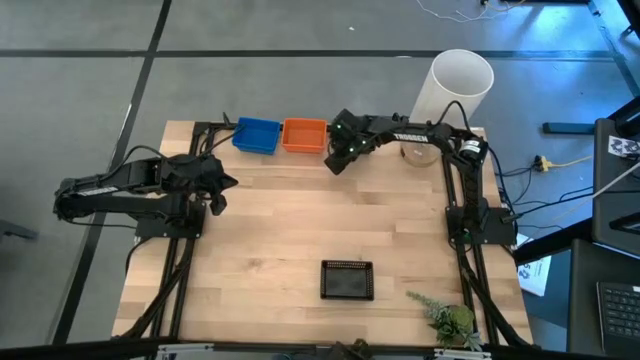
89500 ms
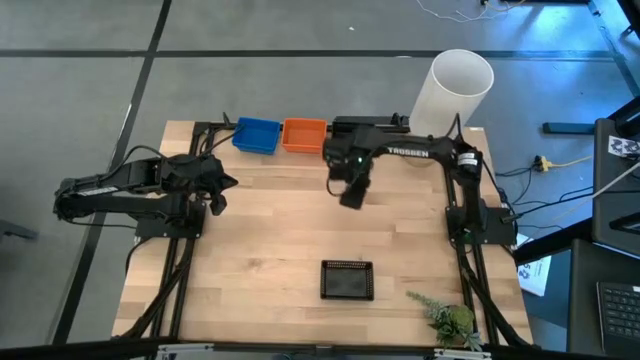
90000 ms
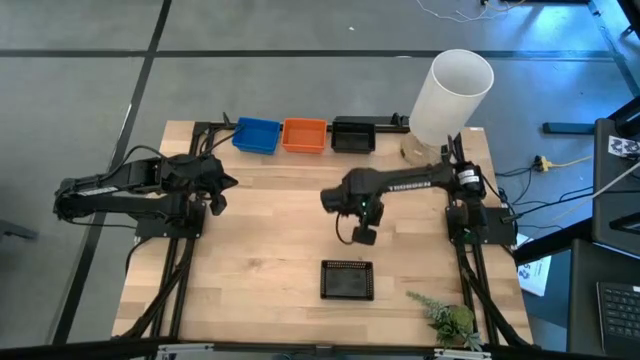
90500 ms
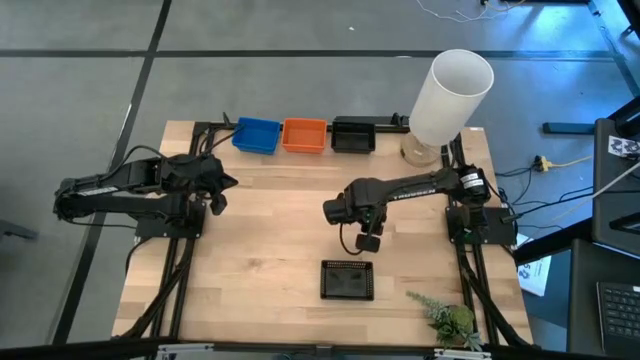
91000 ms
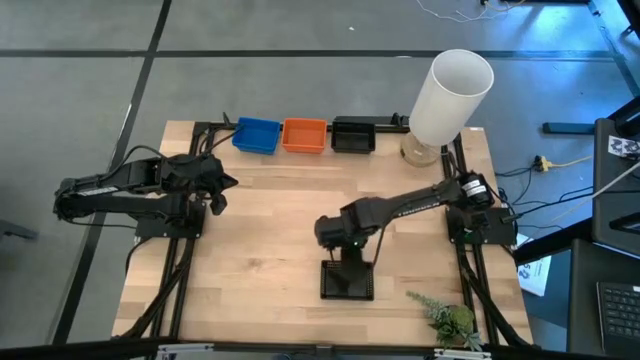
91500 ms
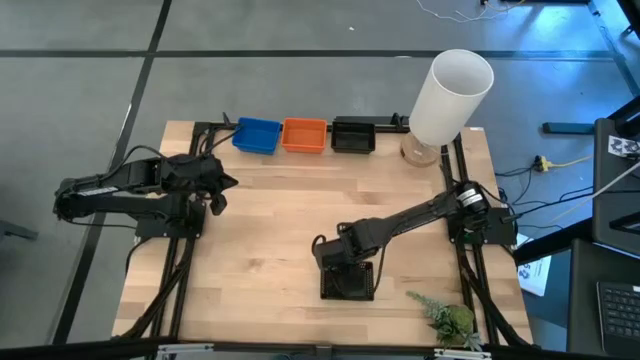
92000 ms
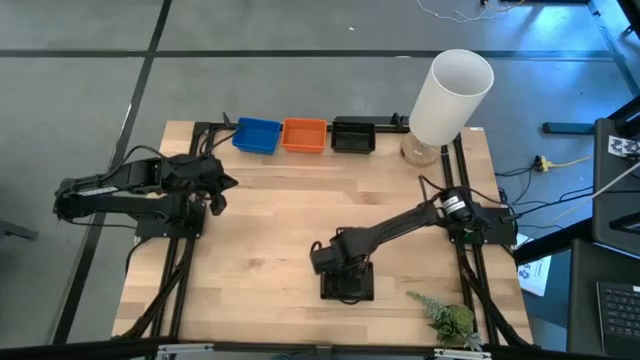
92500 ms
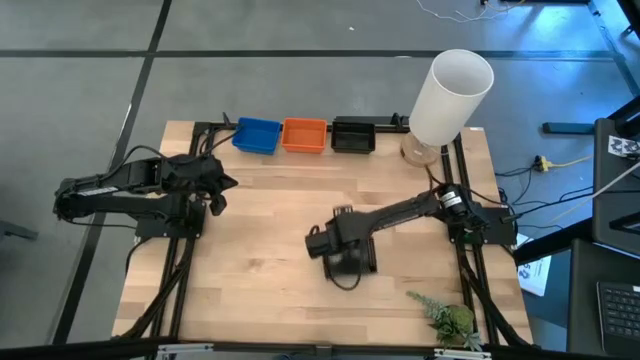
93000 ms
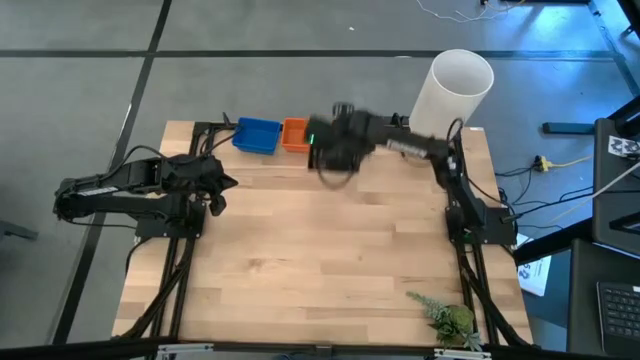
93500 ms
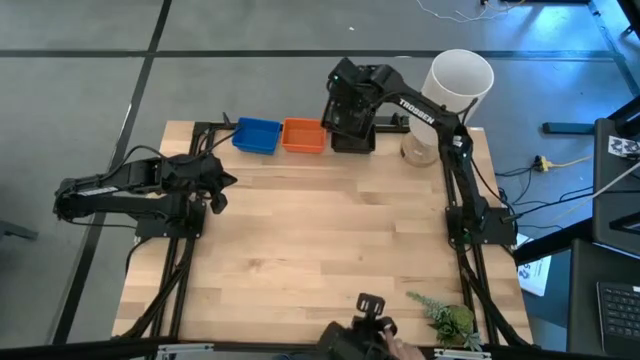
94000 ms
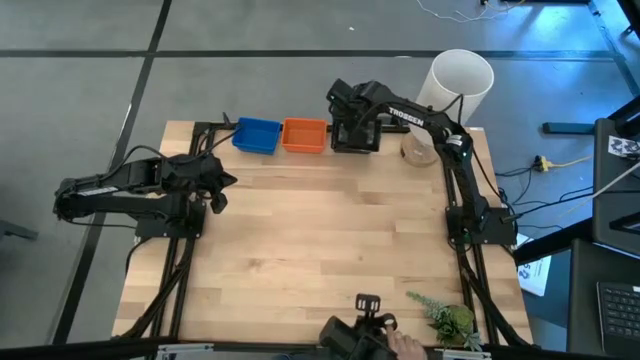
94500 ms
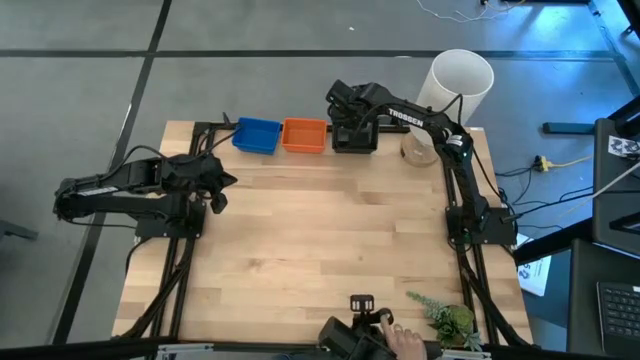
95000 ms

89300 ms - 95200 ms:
Stack the bottom black bin on the stacked black bins

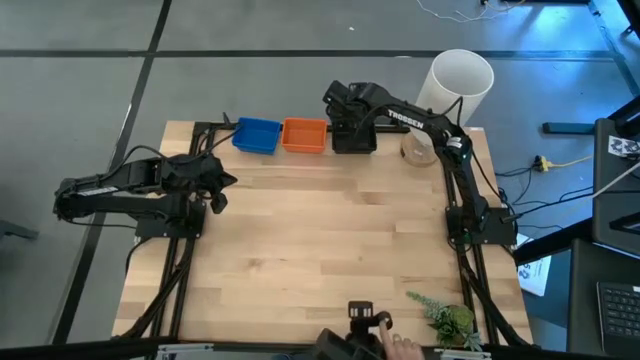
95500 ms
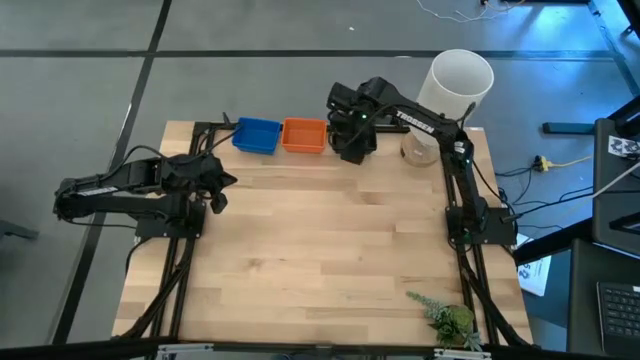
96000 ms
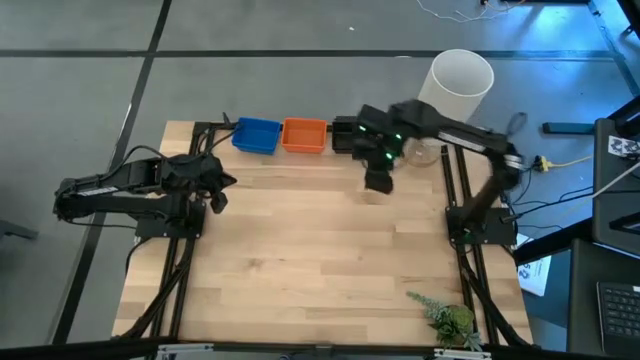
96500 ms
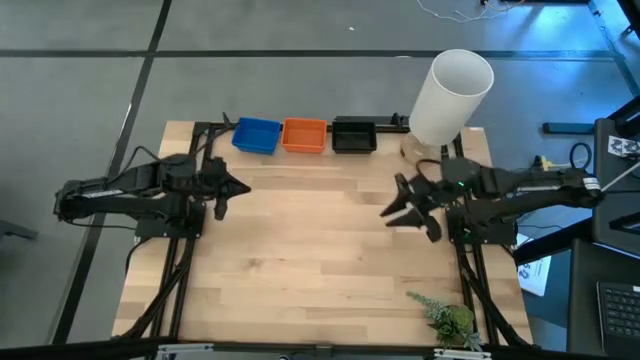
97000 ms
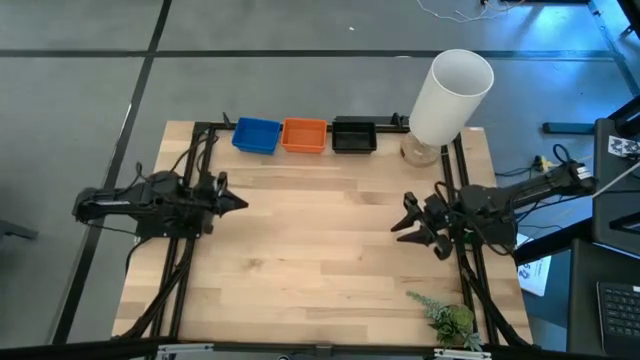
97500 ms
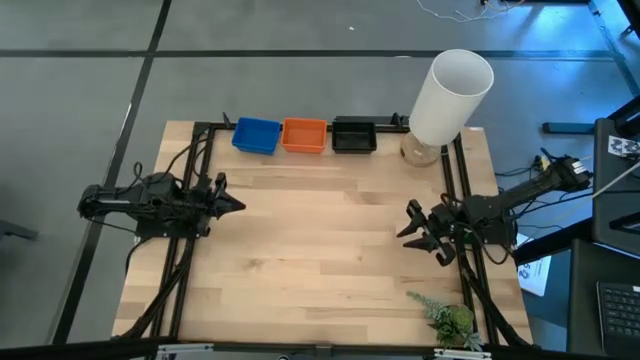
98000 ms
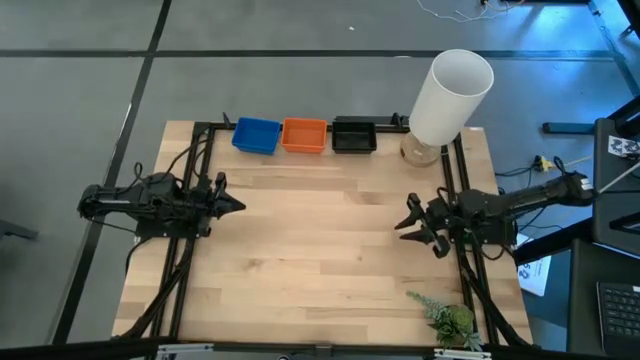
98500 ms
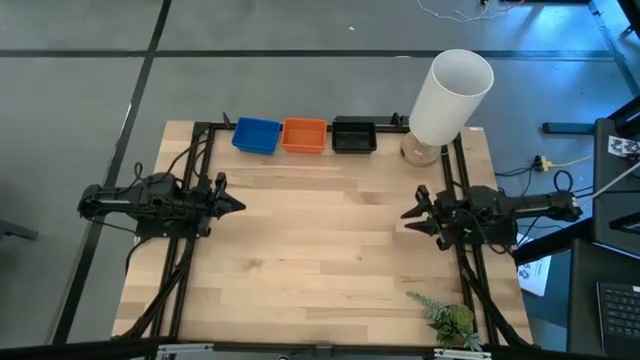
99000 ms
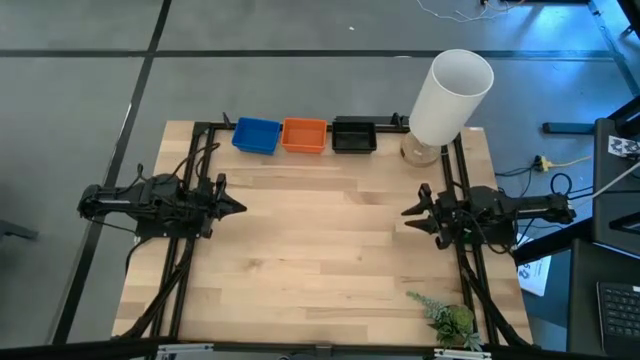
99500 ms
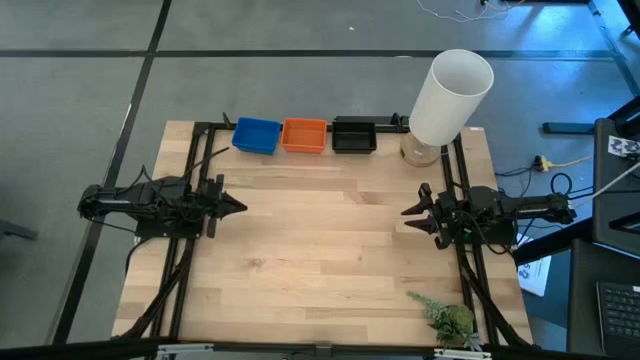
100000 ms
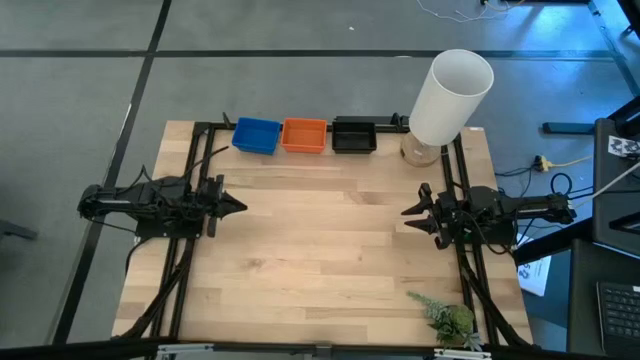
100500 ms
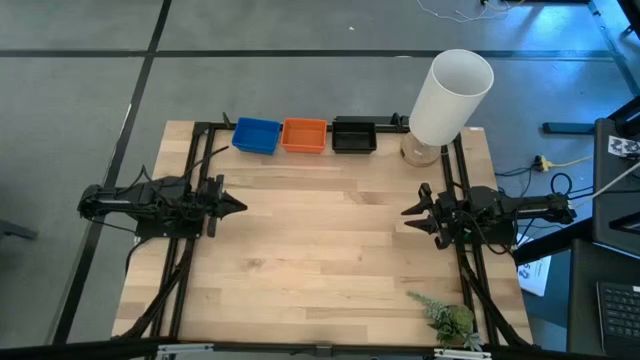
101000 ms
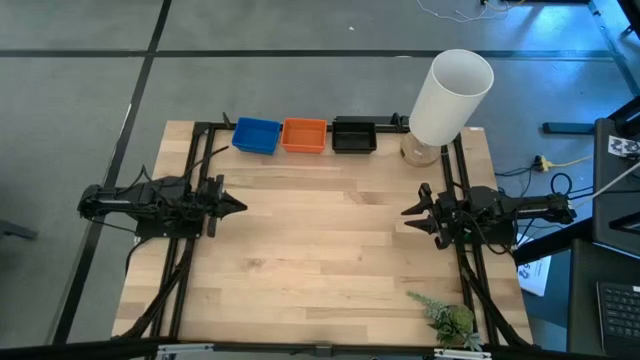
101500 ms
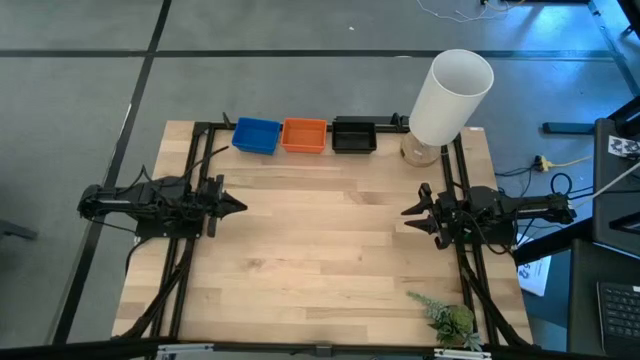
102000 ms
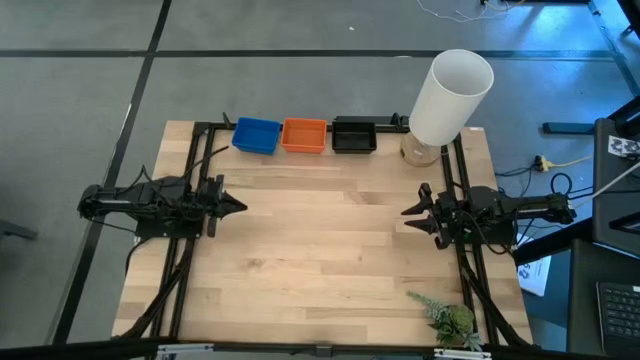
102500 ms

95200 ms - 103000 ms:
Return to Home Position
